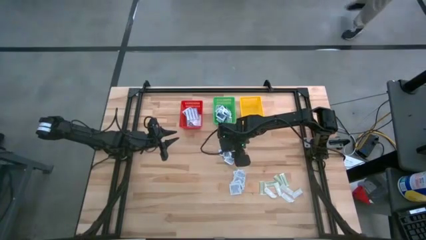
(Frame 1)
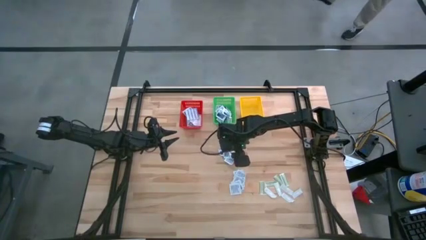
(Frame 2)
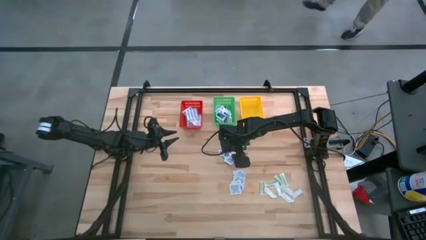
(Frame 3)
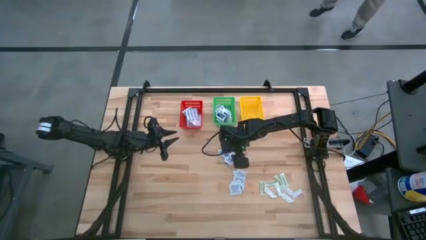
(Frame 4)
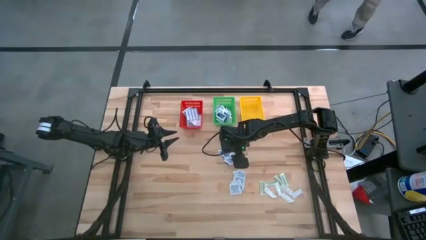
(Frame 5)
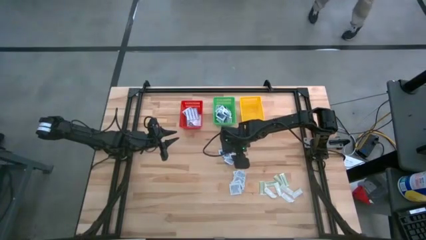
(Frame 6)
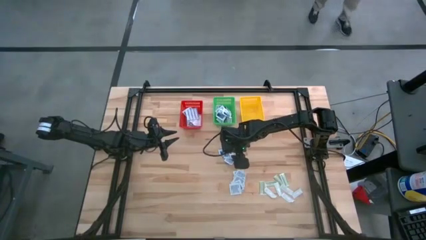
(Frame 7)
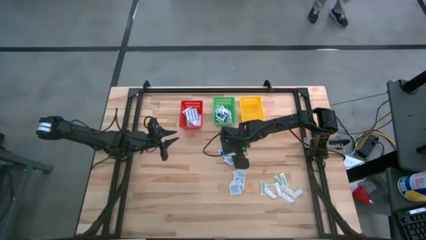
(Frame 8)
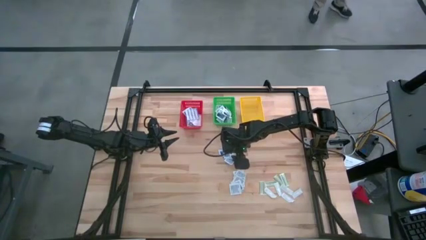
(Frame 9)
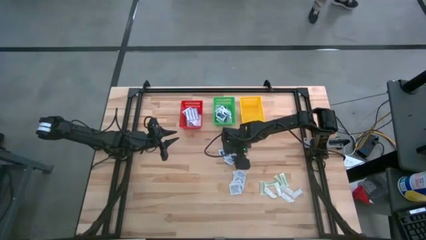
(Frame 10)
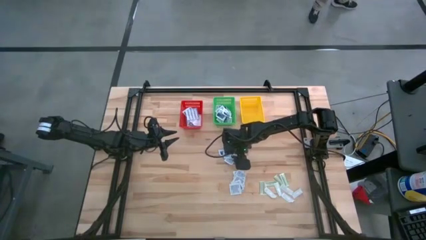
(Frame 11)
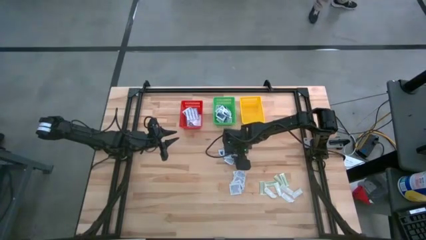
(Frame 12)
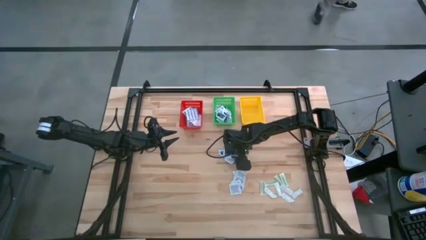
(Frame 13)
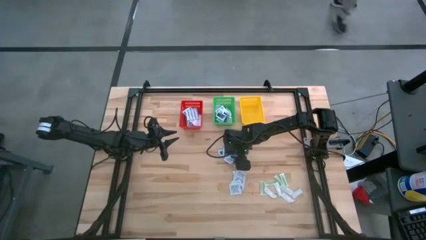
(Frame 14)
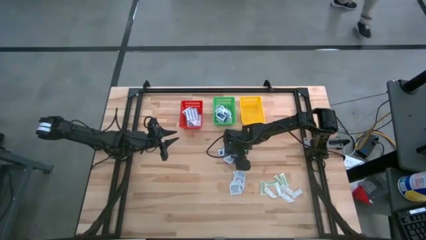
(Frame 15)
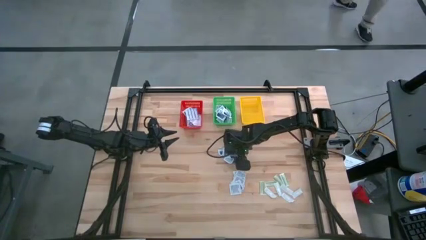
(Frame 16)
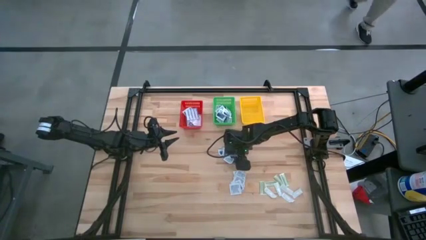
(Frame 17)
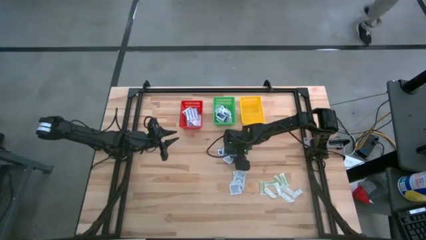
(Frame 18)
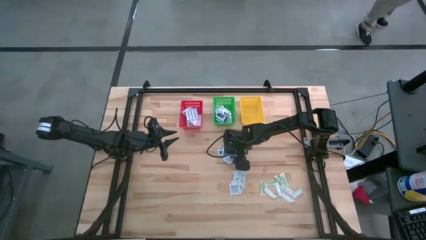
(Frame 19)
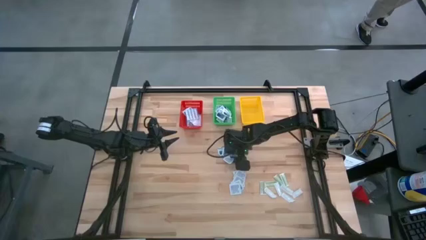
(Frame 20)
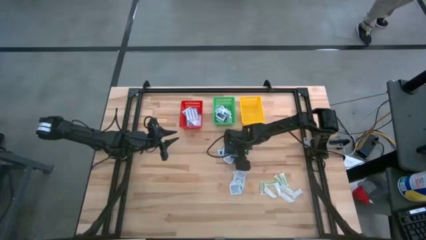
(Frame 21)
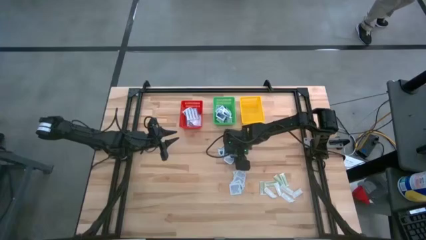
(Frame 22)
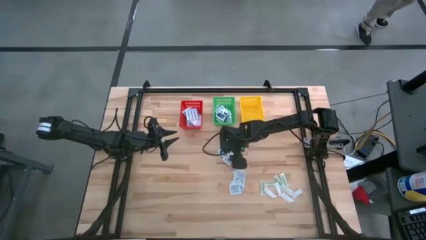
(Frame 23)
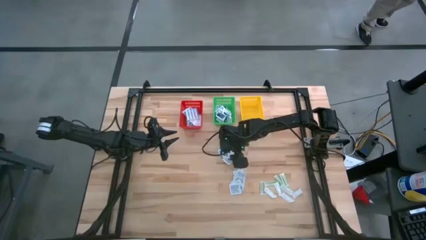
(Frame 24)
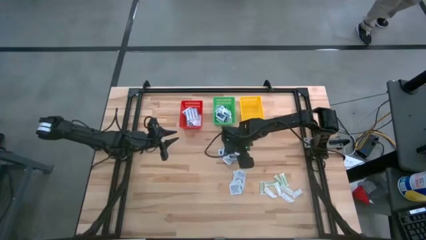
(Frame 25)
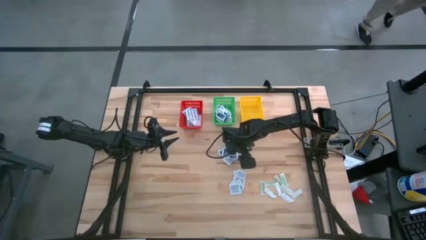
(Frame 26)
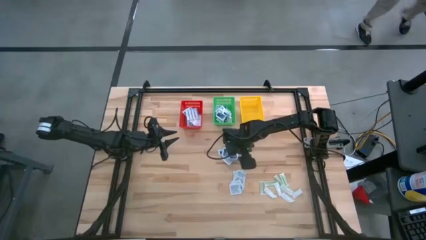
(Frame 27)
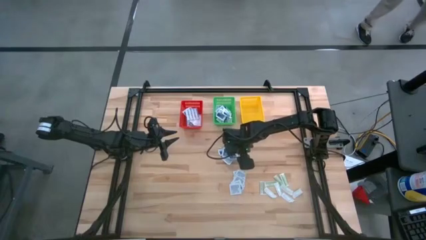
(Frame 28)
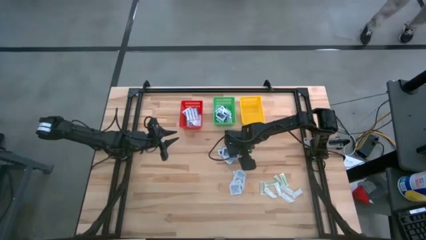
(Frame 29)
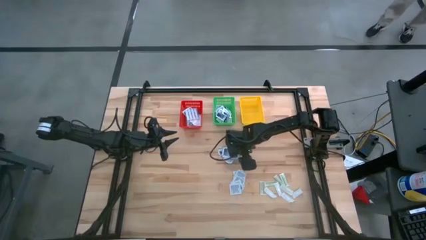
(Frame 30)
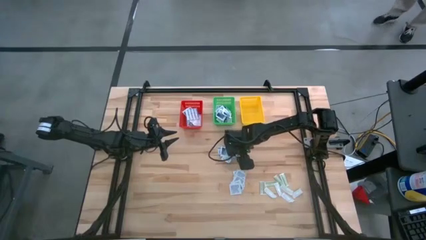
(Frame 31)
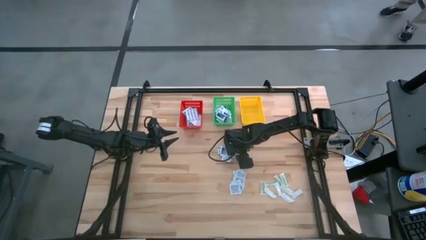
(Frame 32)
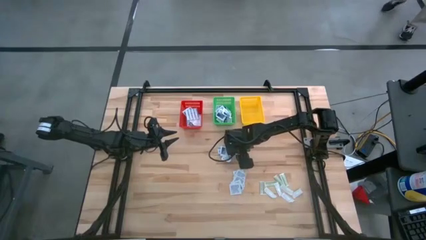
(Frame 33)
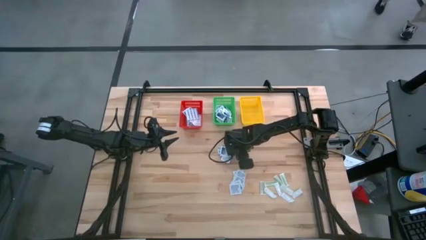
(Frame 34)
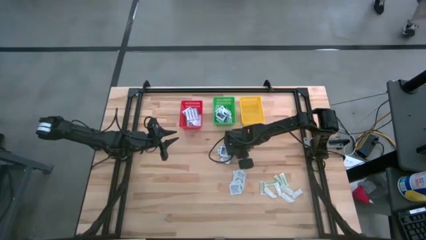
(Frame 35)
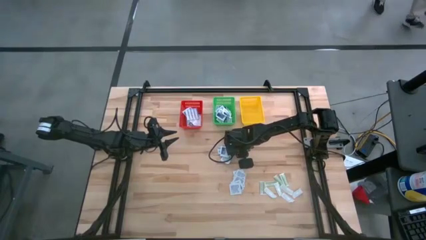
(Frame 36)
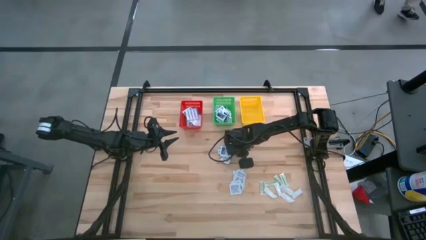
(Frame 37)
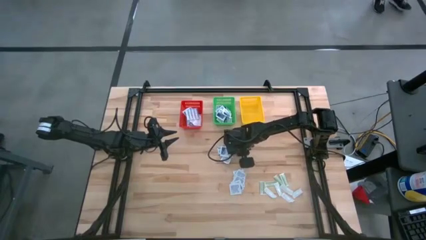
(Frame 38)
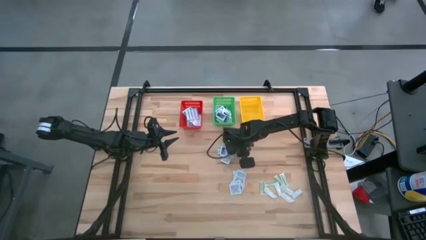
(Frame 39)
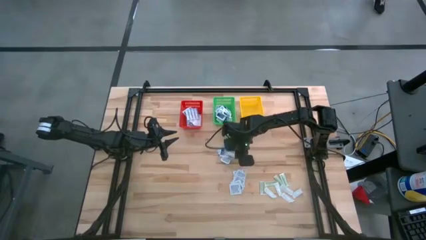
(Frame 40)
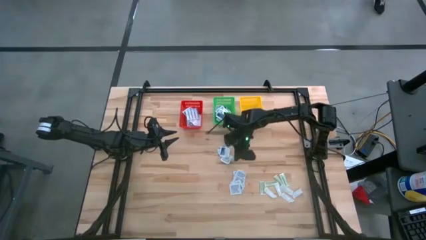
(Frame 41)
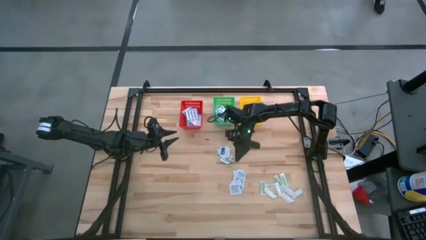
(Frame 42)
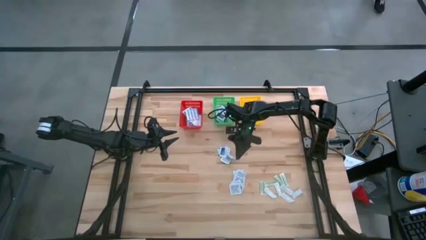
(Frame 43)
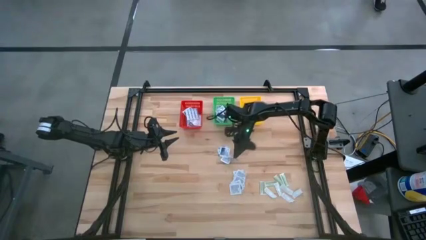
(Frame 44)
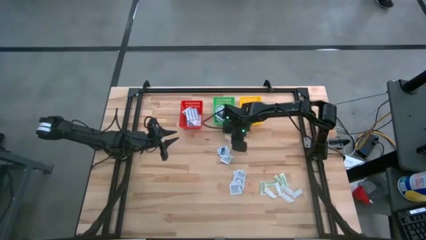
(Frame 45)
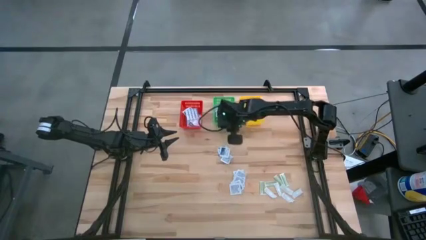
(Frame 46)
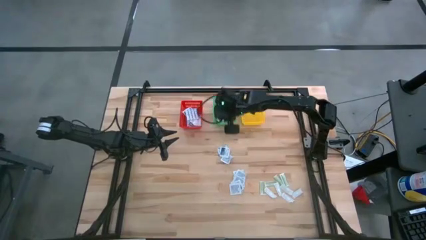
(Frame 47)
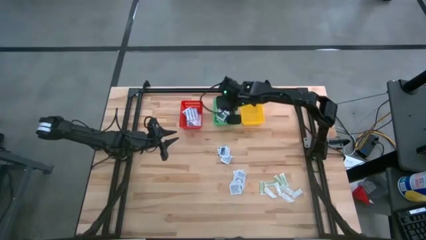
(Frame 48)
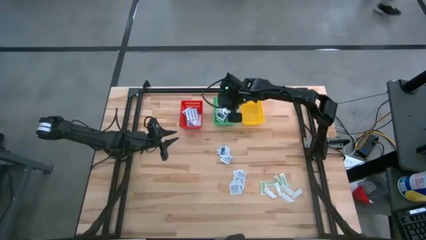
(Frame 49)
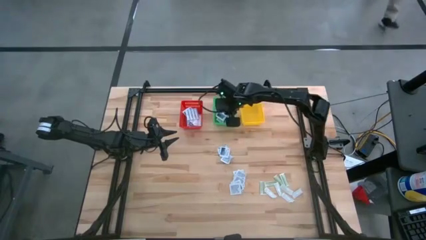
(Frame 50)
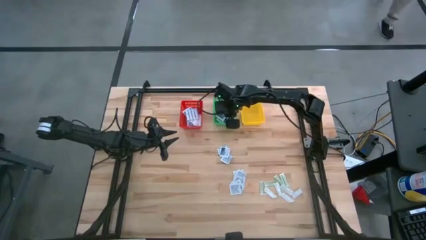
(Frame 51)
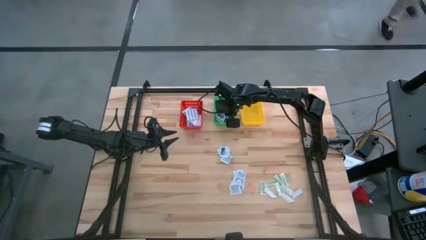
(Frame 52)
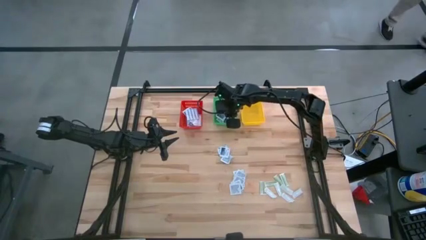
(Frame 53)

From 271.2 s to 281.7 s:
Task: Pick & Place First Aid Supplies
Put the alcohol pad into the green basket

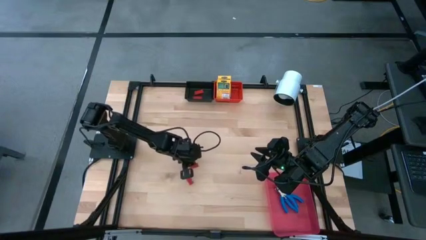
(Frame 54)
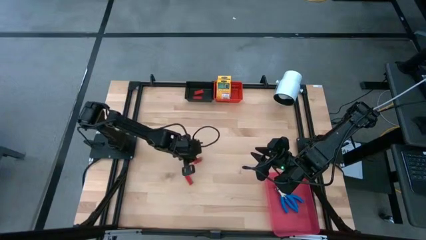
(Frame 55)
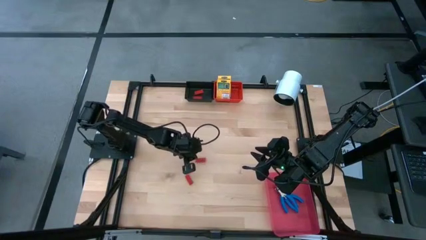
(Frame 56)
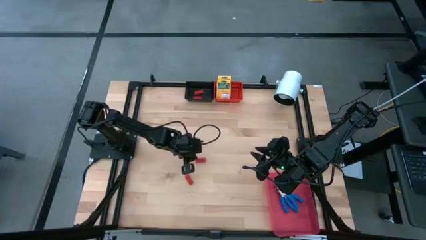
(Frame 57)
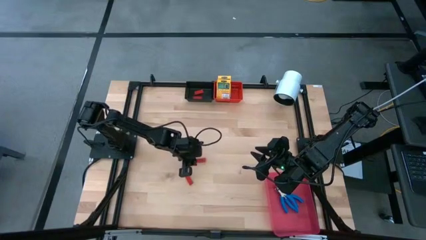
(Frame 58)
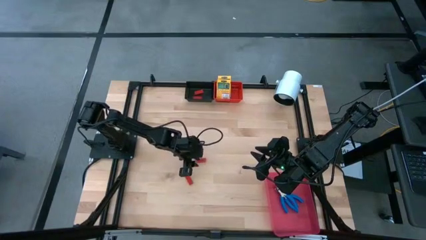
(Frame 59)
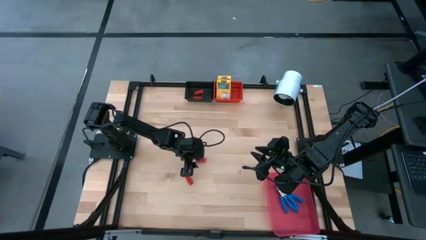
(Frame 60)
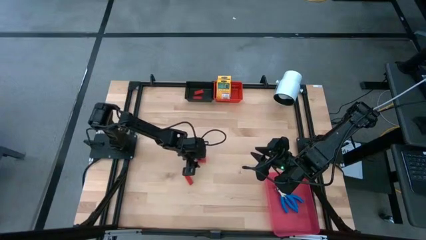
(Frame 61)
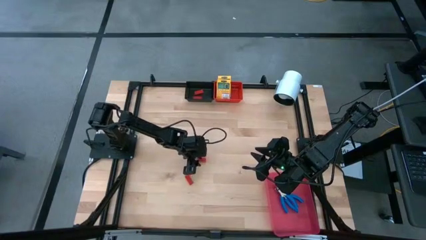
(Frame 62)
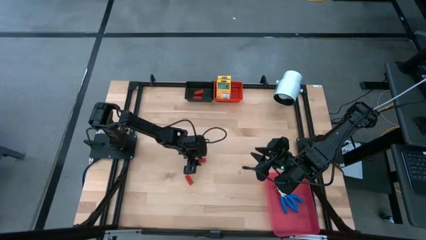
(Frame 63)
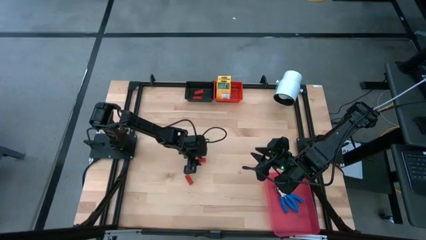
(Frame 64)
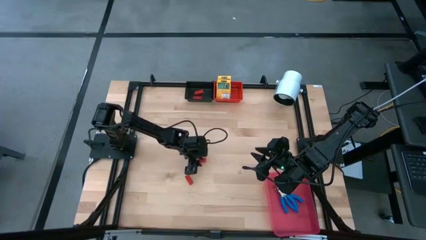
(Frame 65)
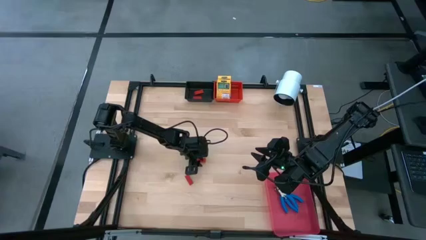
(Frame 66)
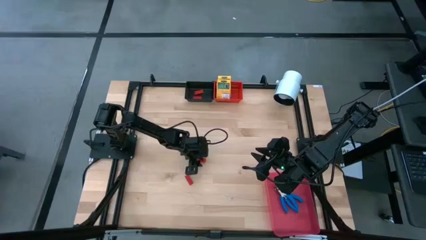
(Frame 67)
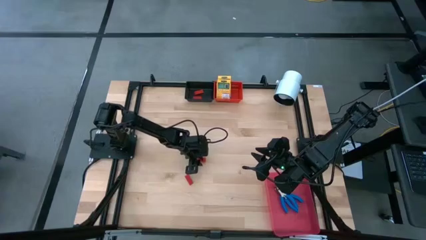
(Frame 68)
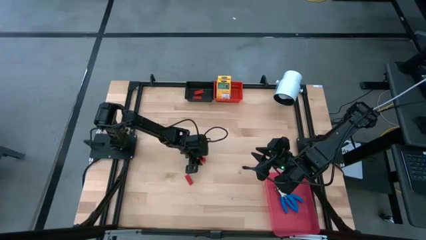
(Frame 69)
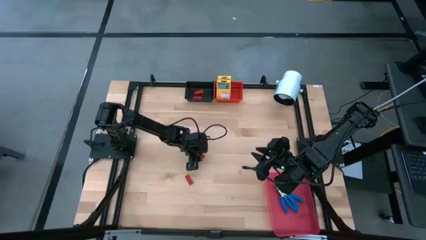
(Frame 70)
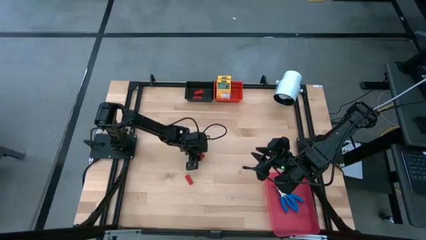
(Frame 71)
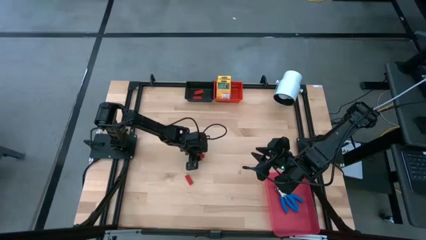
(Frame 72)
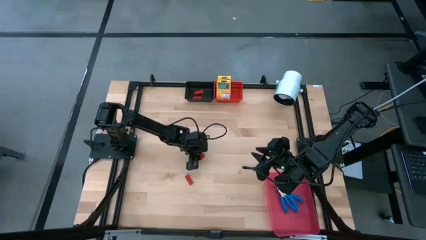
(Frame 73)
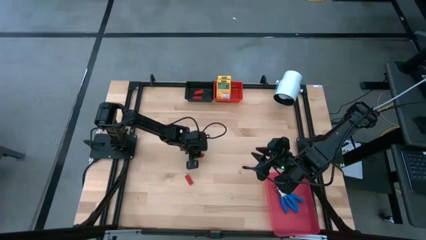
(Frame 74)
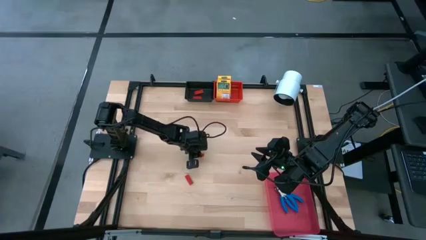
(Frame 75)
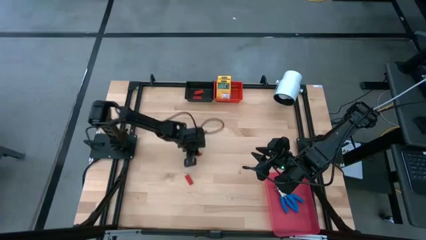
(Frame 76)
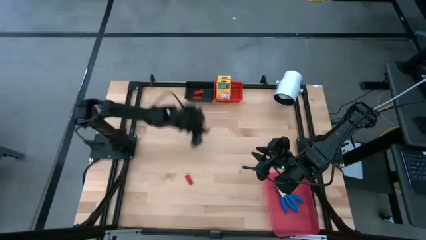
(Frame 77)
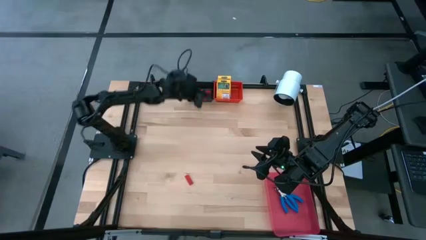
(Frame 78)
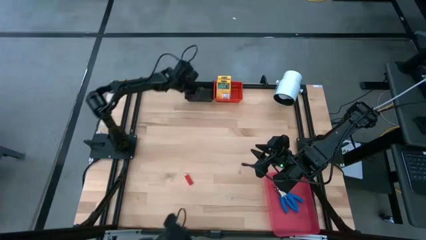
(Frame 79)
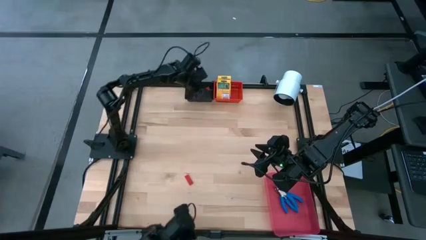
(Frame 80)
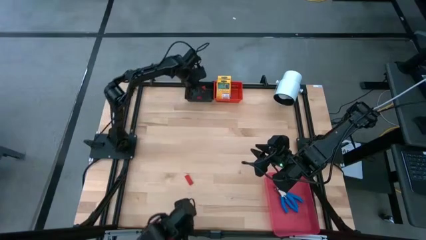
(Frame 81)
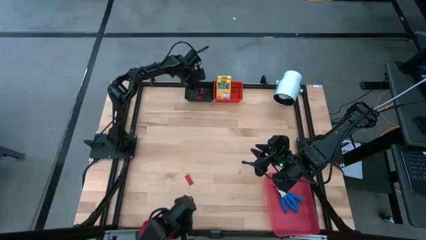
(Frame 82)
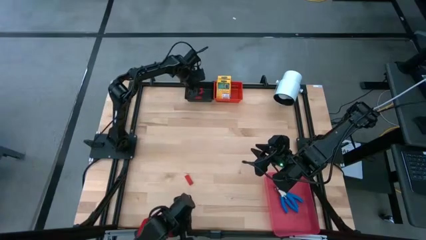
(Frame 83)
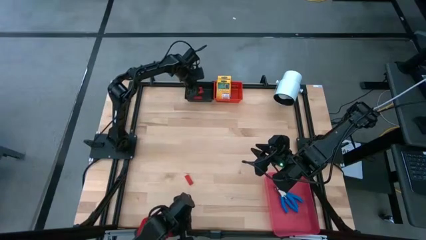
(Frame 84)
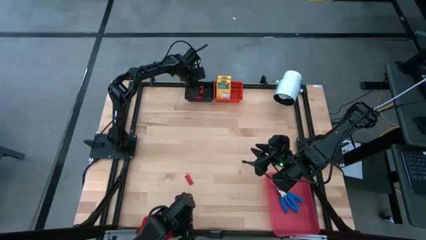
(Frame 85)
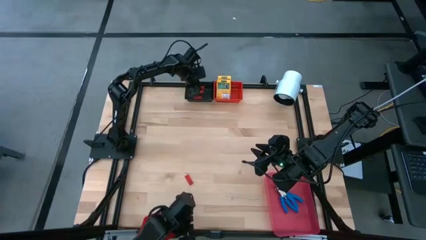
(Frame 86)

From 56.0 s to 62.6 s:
Task: Pick & Place School Supplies
Put the red eraser into the black bin
